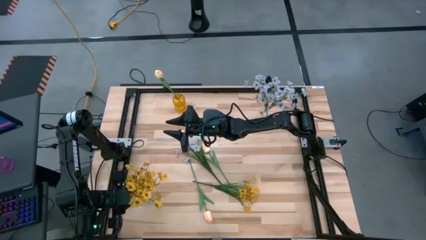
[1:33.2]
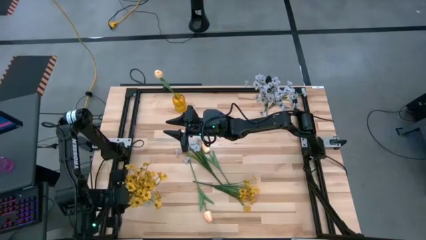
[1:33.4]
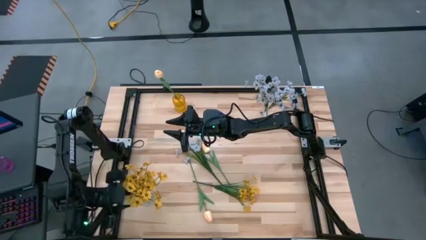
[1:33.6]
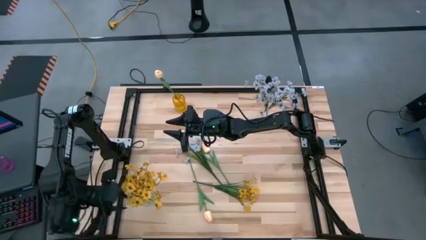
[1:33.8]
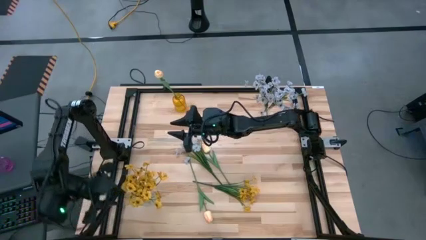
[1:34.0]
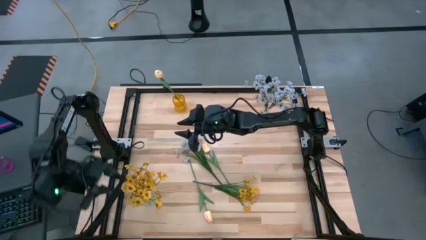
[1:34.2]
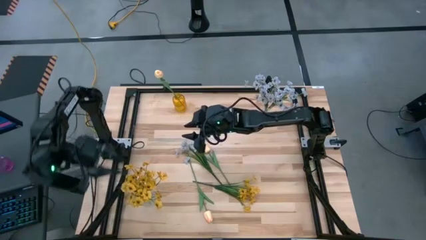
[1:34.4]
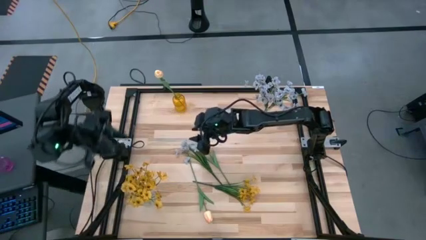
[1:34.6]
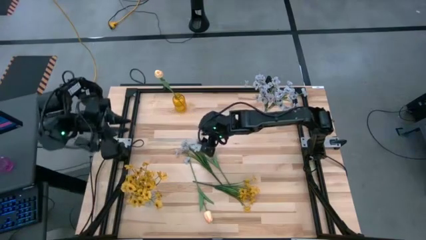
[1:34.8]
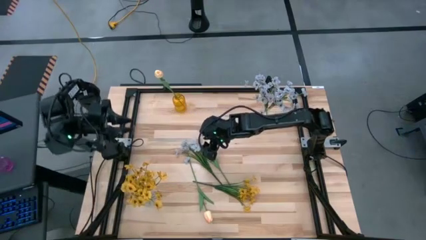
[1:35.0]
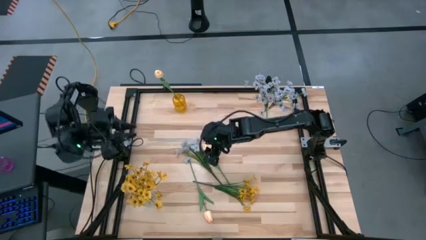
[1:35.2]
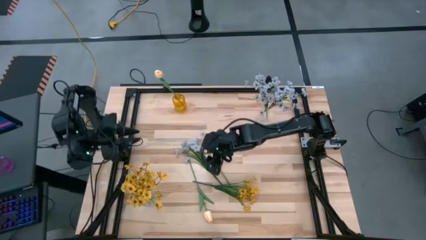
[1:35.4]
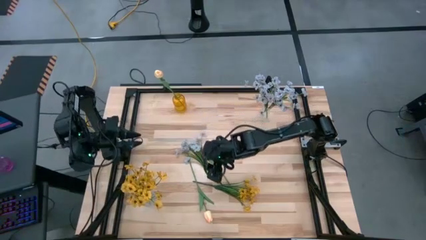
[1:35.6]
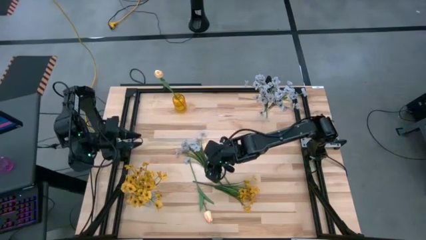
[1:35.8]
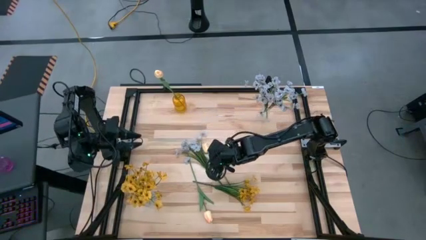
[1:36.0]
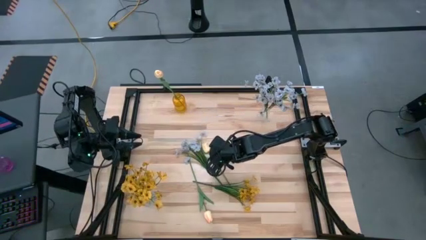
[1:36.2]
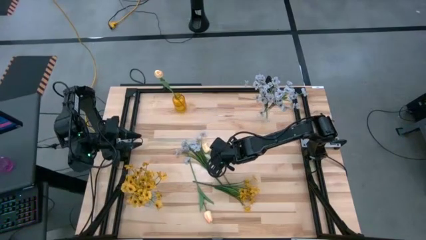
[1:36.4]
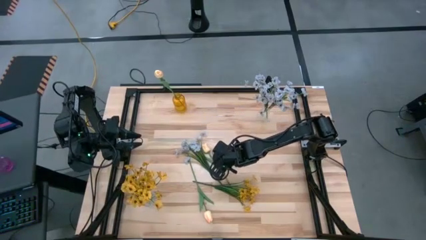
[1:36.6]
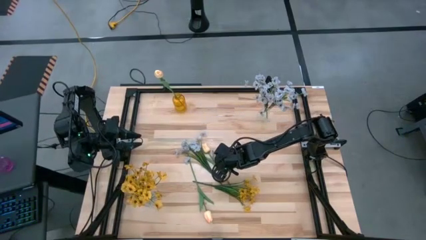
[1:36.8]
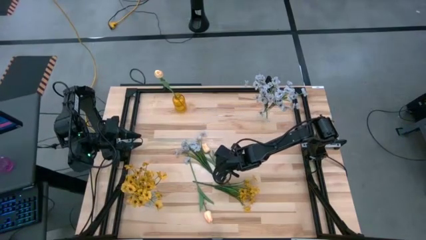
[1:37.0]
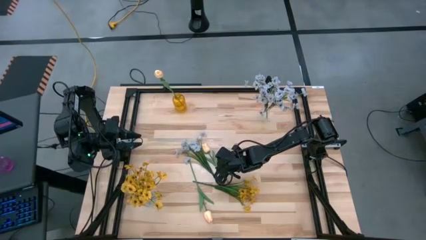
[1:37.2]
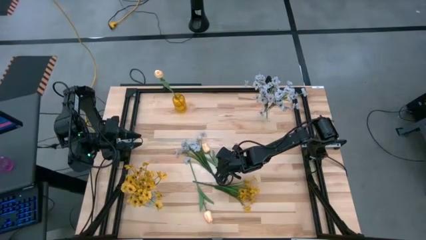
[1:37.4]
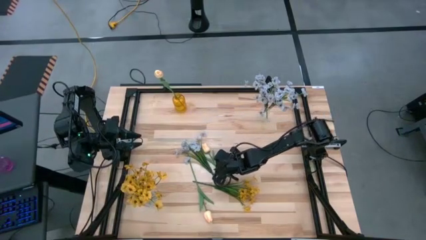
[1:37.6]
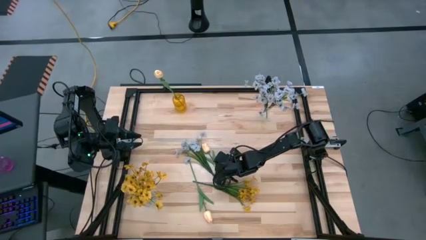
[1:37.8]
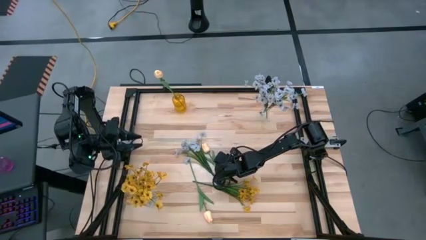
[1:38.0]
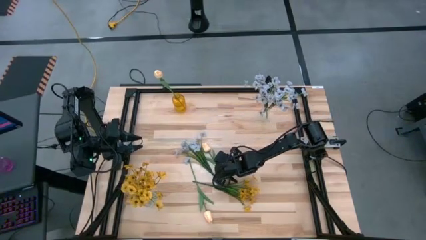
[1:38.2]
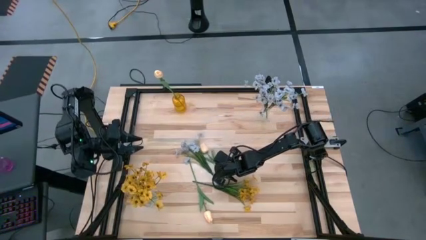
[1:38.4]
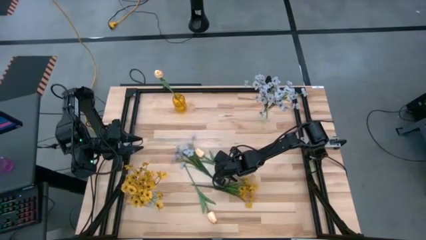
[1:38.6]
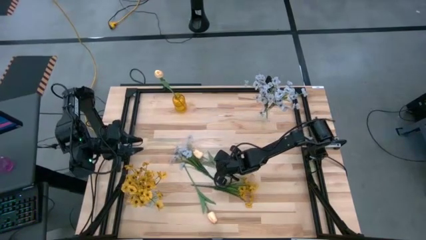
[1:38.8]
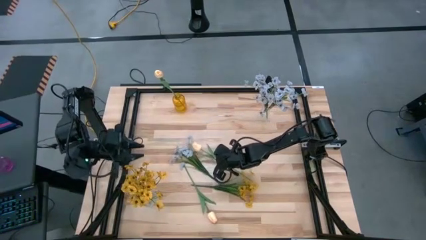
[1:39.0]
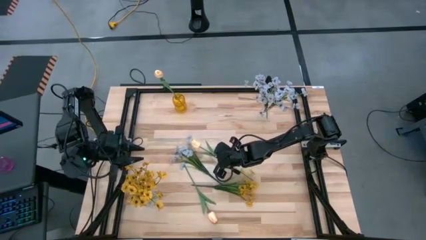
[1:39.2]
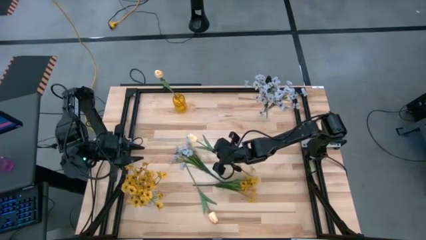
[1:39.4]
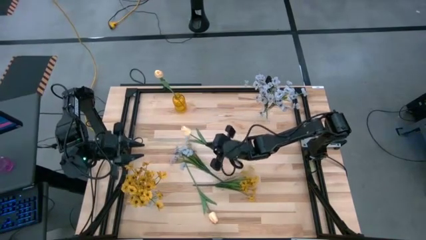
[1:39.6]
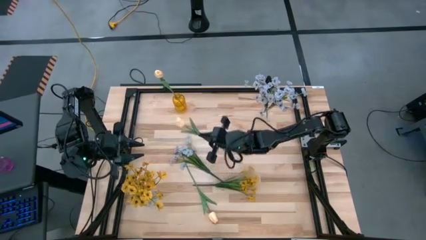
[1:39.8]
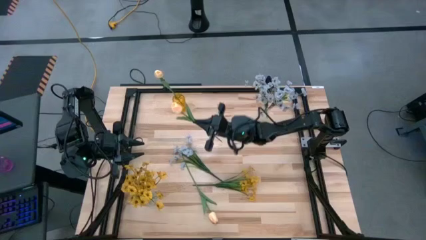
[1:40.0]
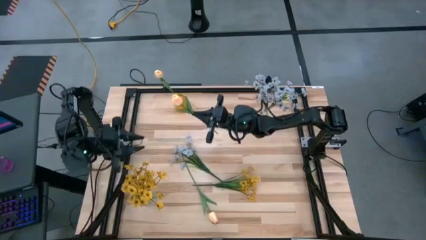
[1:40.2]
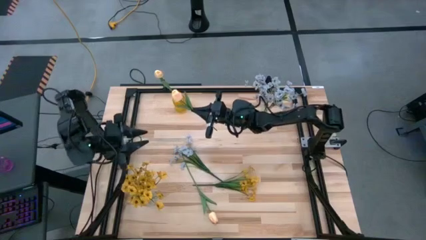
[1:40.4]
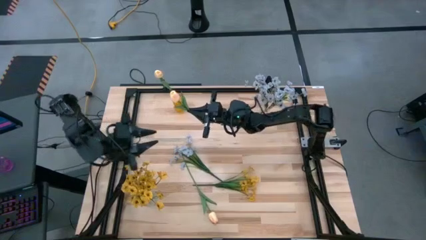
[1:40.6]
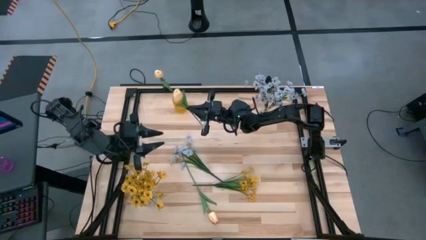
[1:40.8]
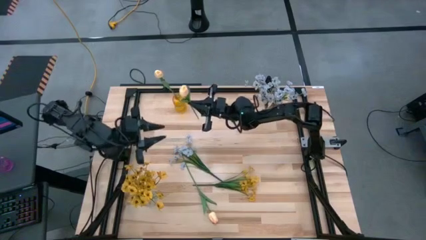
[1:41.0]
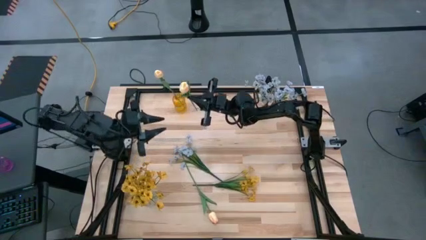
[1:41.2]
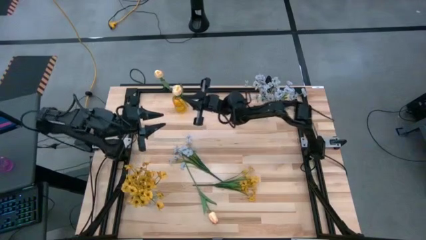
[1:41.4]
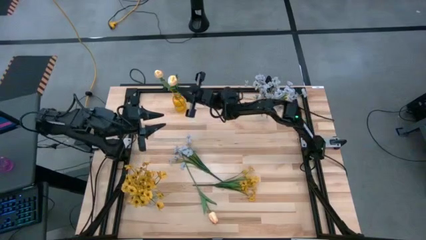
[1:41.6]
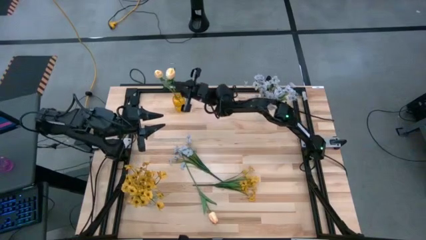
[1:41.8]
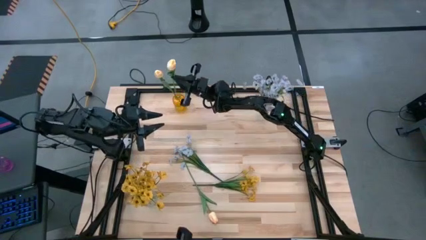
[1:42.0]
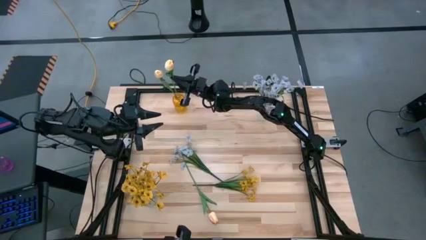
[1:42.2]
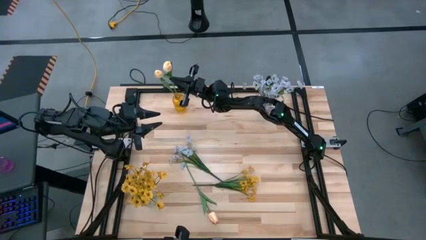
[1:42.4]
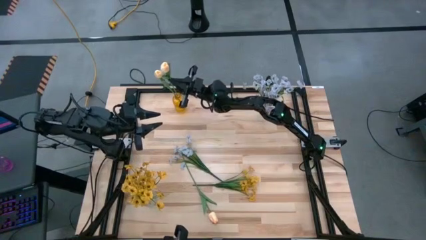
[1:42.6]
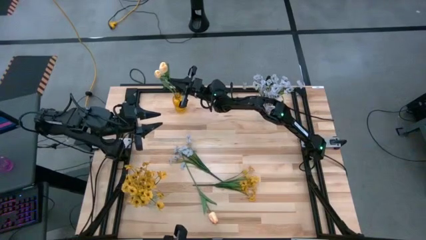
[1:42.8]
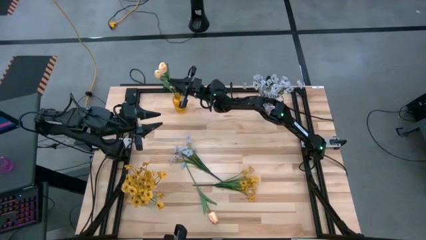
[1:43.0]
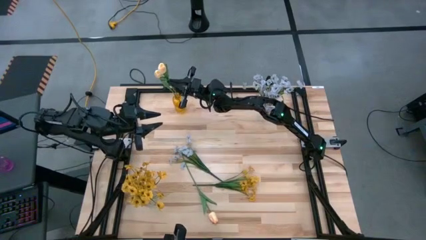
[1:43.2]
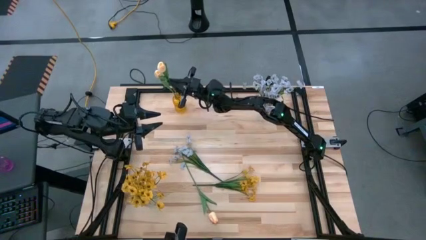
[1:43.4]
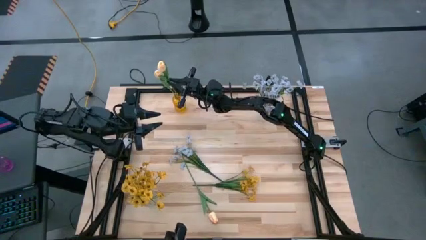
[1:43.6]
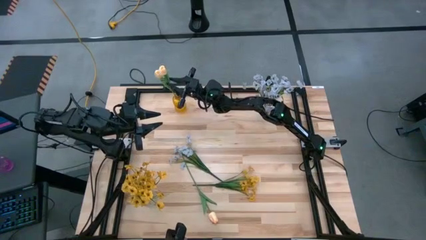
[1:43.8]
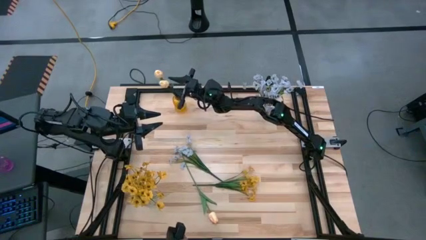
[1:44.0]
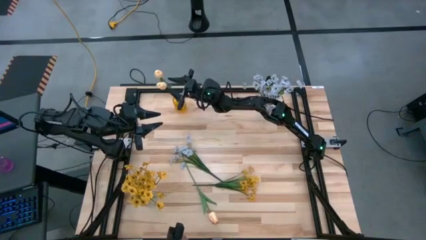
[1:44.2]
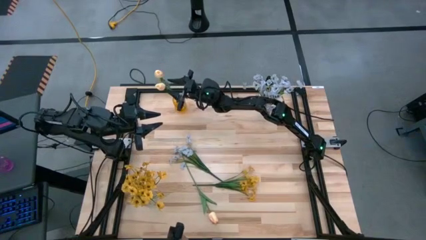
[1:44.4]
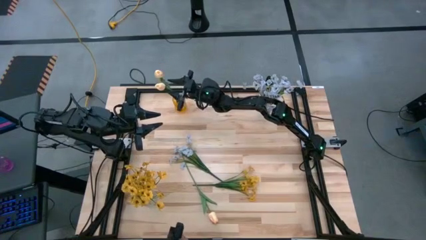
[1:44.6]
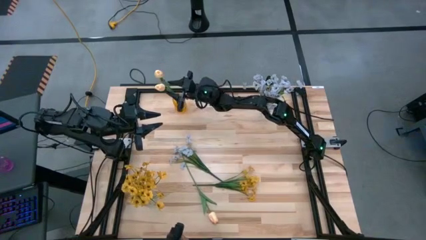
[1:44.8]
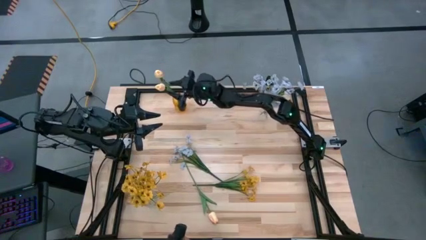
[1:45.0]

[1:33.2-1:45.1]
Task: Sort flowers into vase by color
Put the top pink tulip into the yellow vase

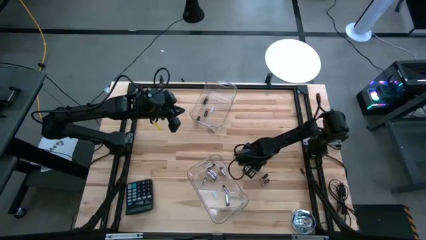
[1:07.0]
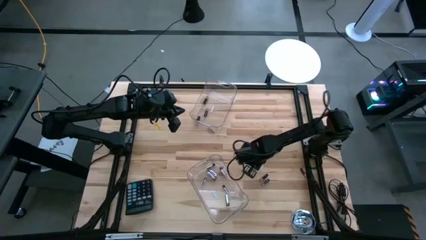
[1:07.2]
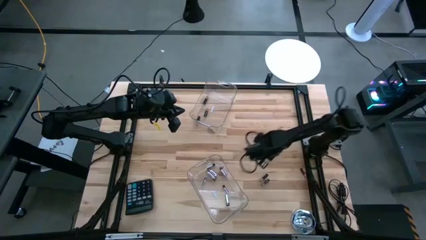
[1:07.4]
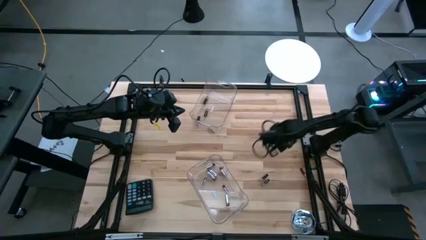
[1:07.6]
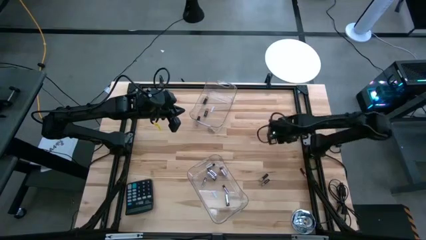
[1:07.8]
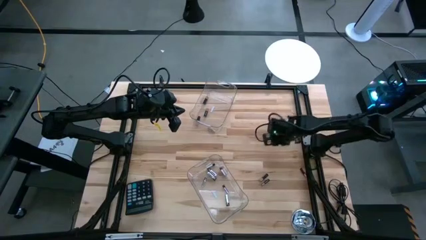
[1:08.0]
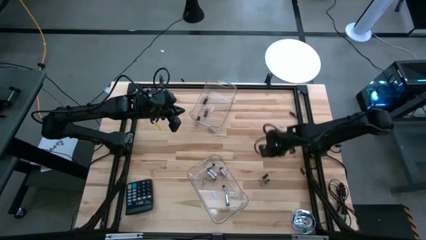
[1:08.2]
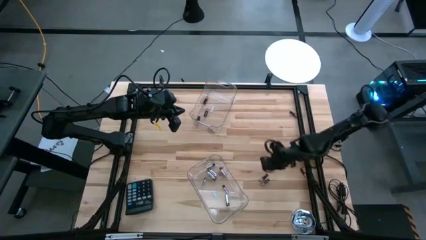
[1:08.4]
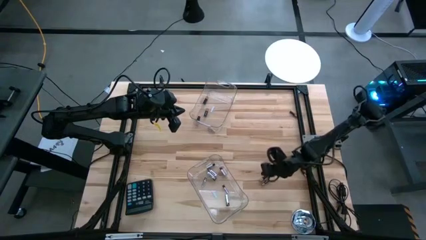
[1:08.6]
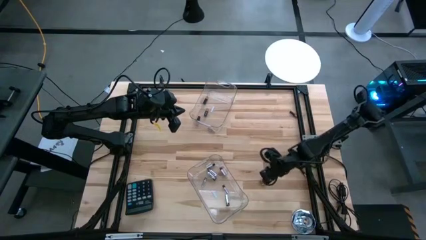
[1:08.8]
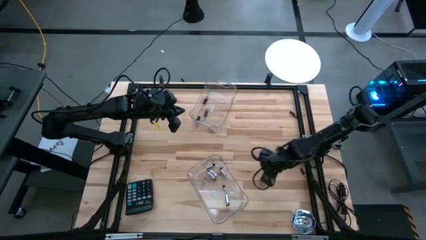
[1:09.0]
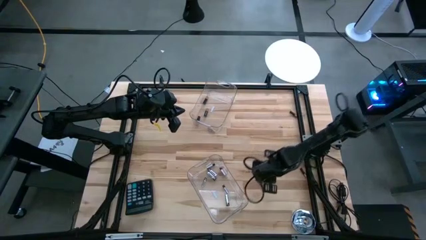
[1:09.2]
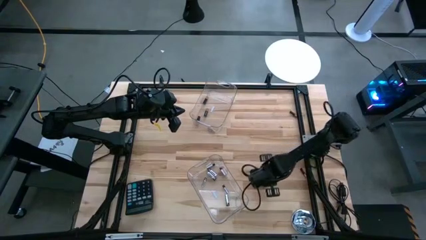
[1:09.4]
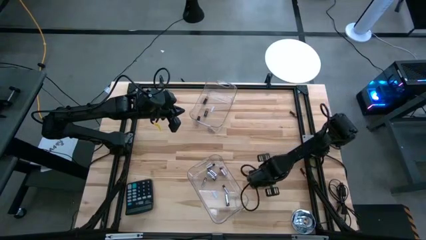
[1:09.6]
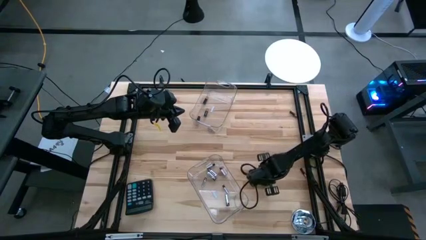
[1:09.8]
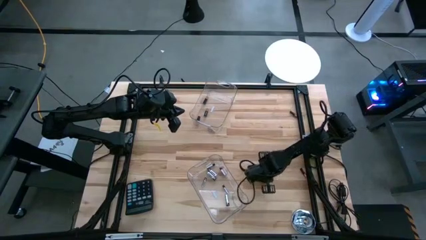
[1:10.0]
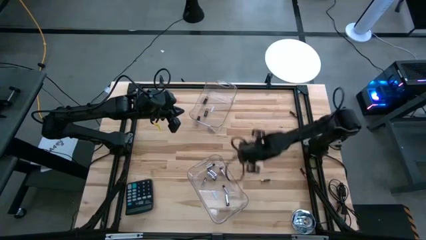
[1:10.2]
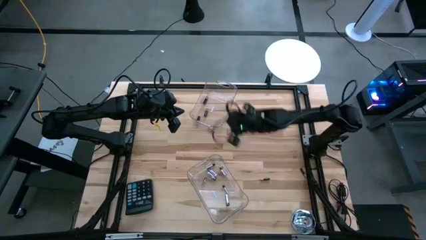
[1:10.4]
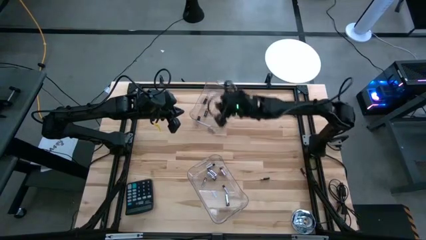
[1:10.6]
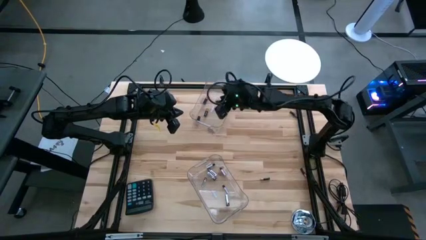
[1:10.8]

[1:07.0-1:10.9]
Task: Sort batteries
Put the black battery into the top transparent bin

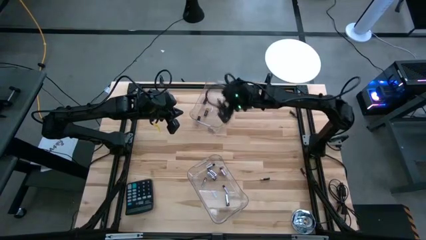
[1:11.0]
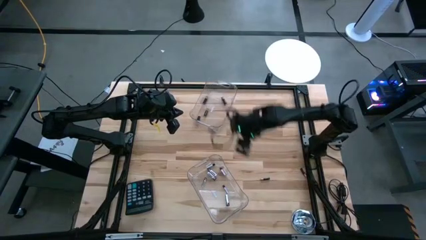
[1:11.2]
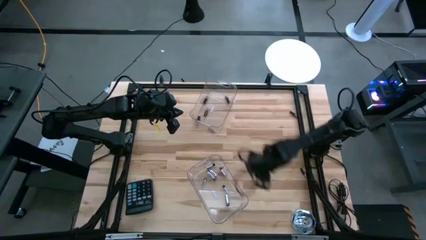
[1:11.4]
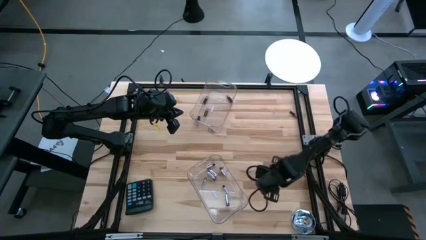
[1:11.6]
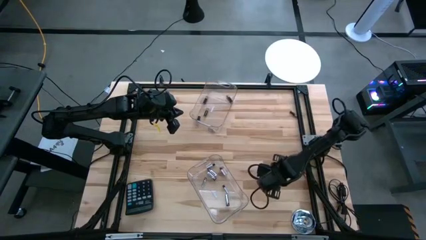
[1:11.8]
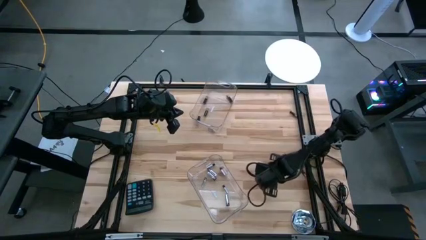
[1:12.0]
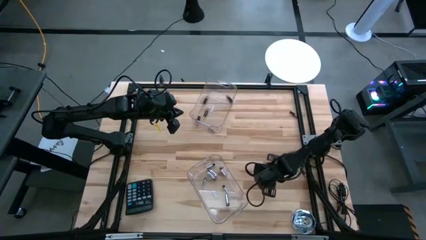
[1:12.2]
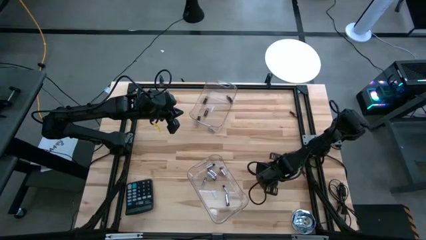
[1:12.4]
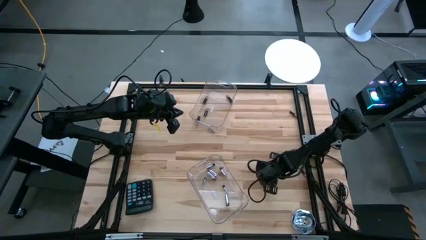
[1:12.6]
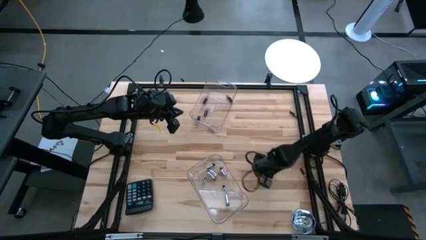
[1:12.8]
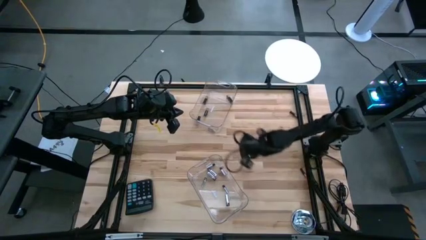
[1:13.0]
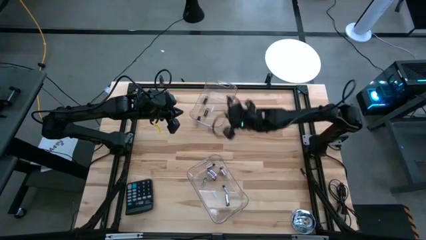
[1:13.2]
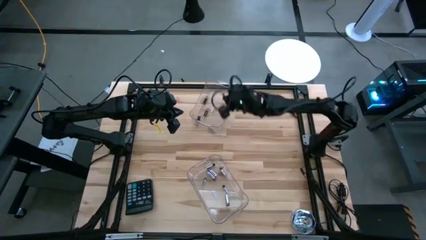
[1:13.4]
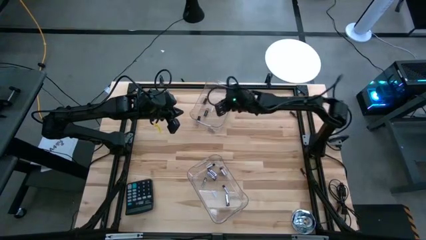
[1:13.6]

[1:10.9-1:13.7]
Put the black battery into the top transparent bin
